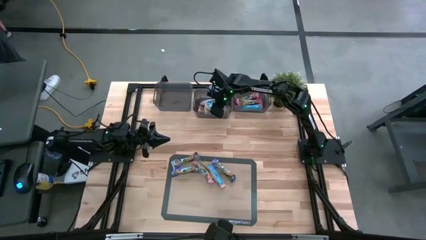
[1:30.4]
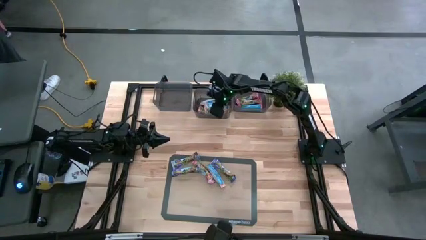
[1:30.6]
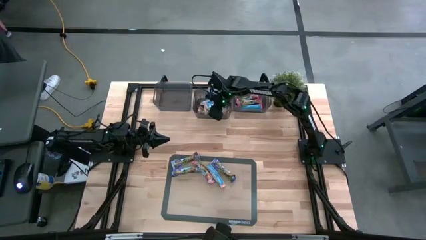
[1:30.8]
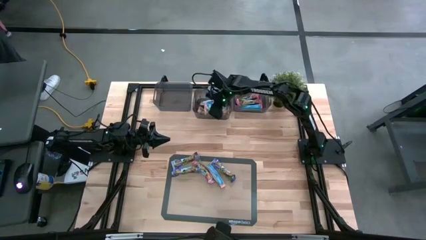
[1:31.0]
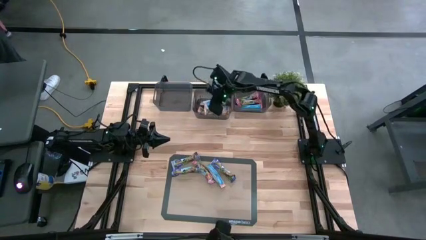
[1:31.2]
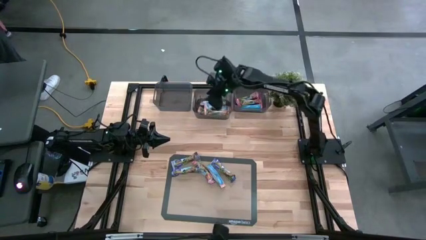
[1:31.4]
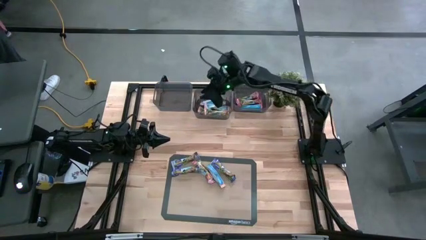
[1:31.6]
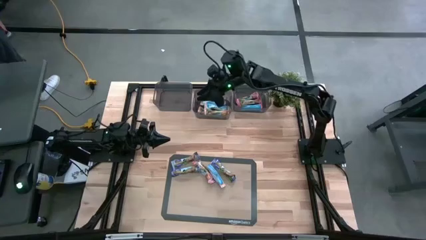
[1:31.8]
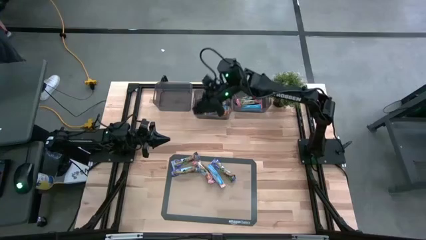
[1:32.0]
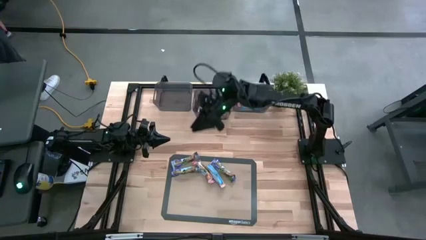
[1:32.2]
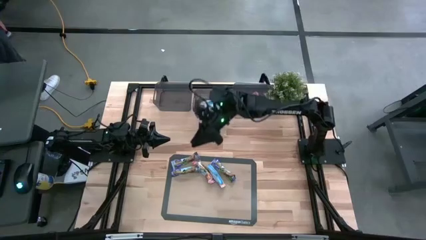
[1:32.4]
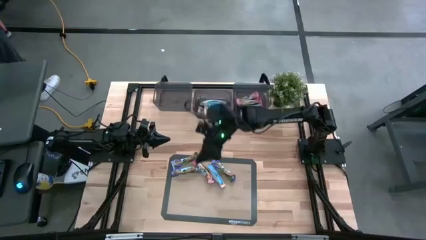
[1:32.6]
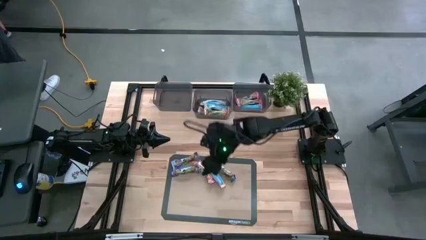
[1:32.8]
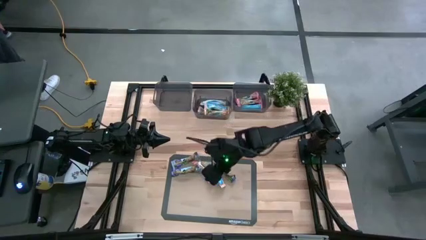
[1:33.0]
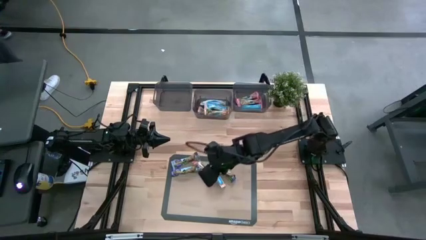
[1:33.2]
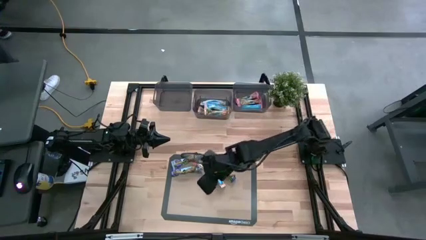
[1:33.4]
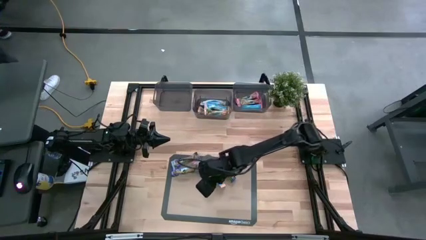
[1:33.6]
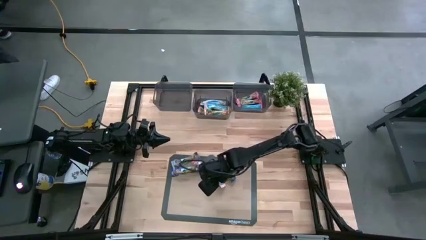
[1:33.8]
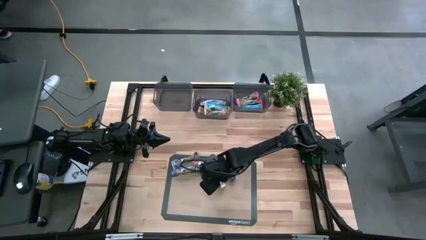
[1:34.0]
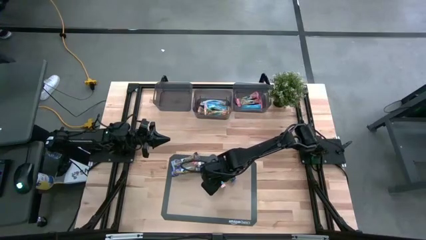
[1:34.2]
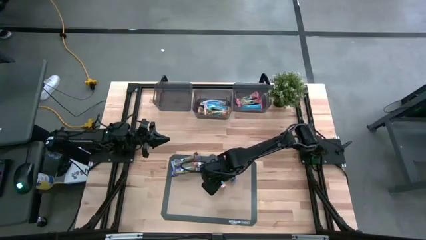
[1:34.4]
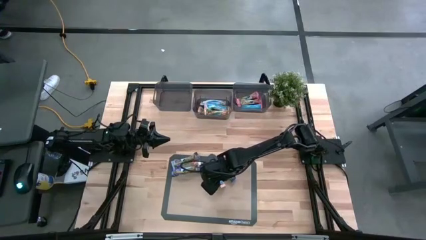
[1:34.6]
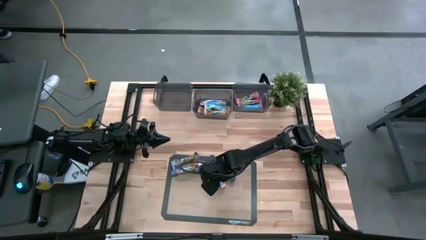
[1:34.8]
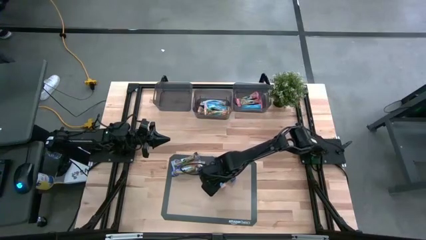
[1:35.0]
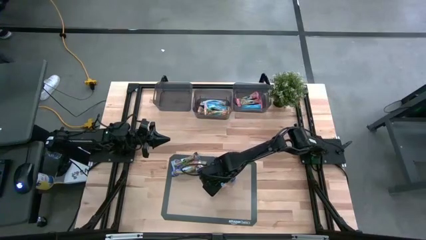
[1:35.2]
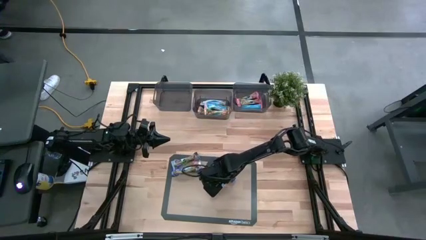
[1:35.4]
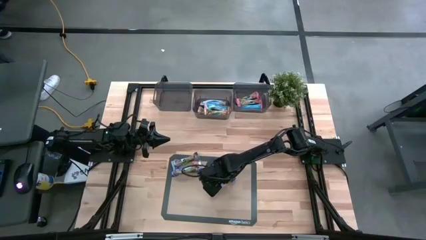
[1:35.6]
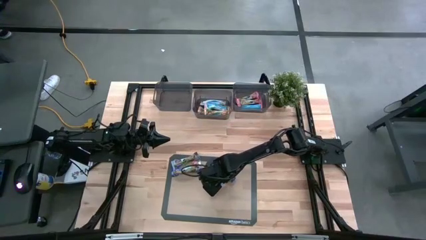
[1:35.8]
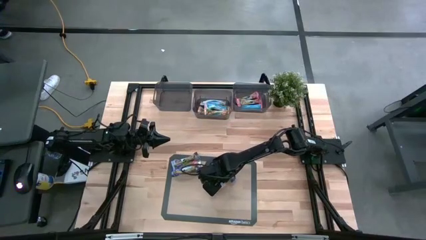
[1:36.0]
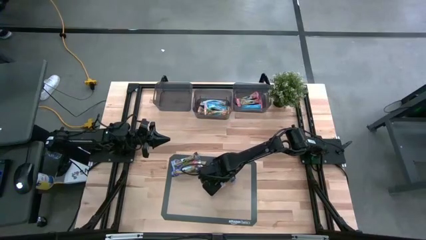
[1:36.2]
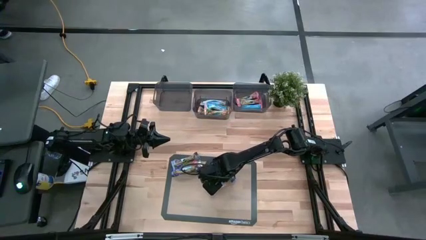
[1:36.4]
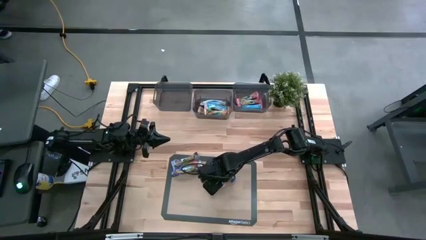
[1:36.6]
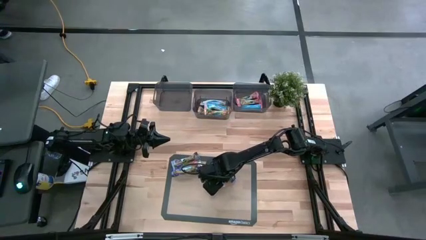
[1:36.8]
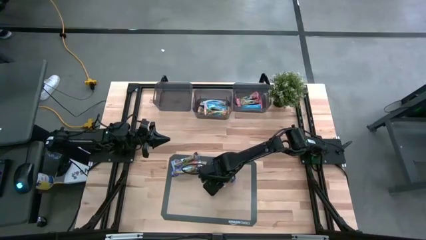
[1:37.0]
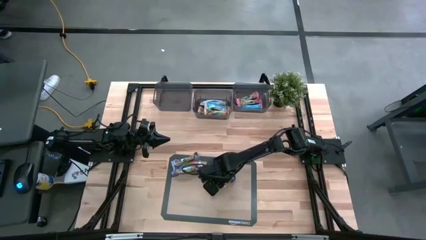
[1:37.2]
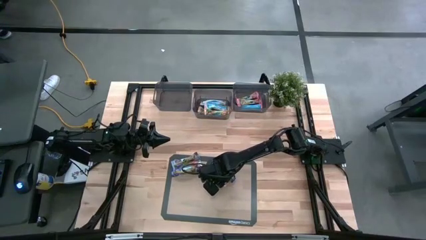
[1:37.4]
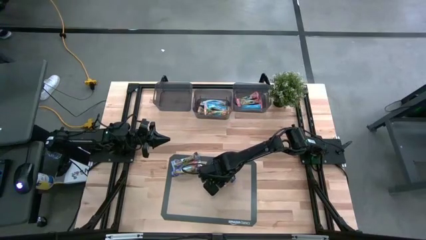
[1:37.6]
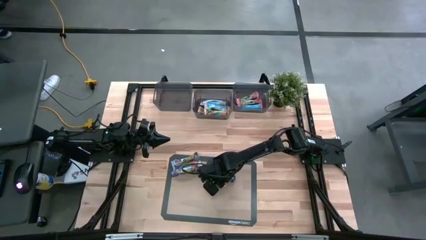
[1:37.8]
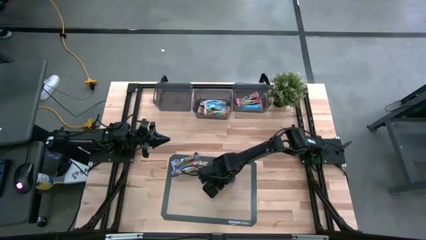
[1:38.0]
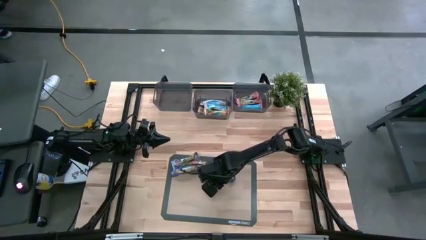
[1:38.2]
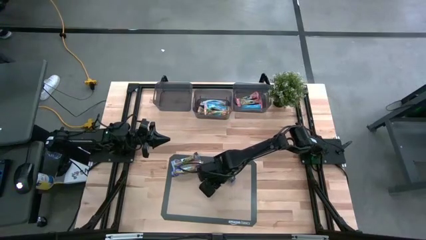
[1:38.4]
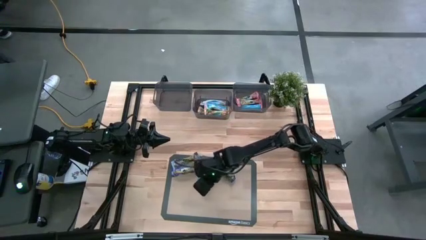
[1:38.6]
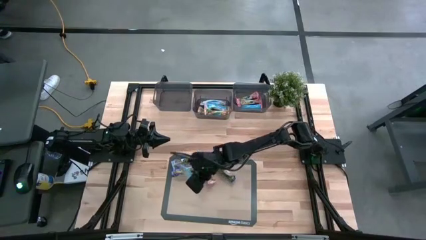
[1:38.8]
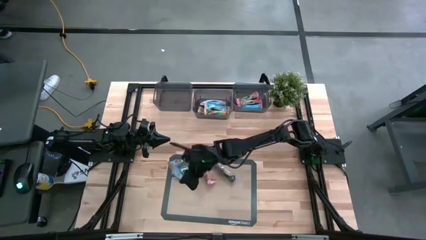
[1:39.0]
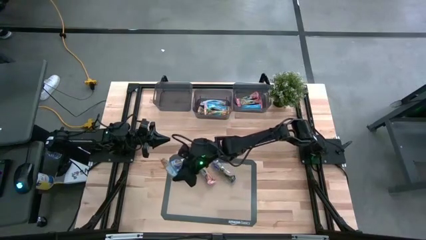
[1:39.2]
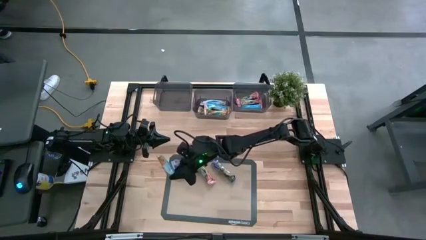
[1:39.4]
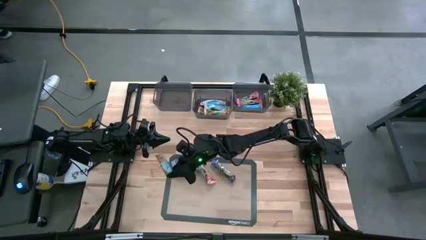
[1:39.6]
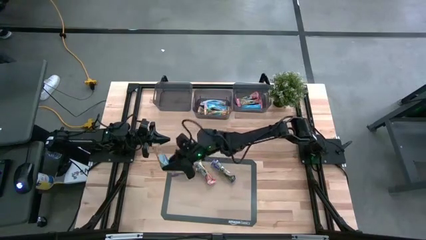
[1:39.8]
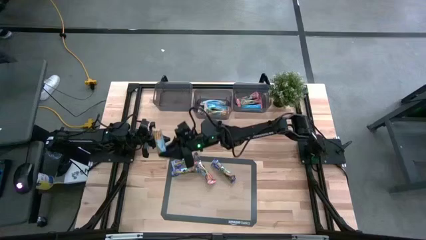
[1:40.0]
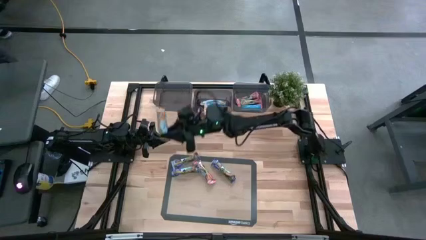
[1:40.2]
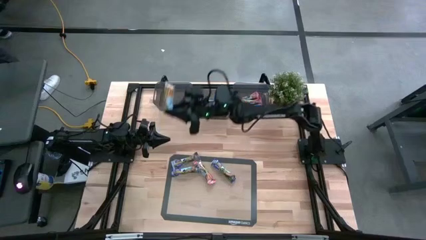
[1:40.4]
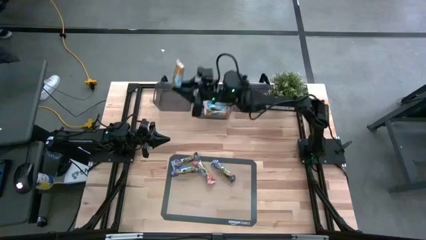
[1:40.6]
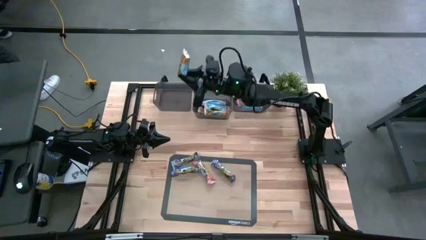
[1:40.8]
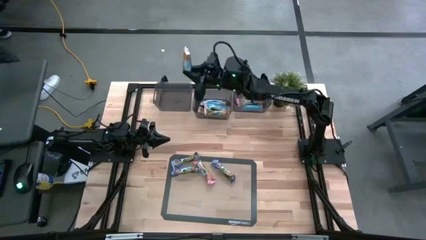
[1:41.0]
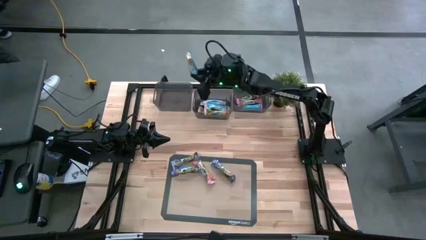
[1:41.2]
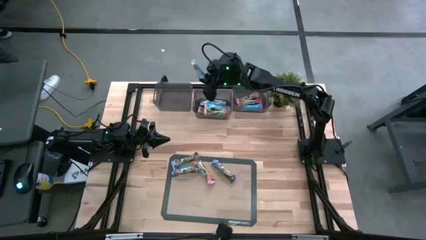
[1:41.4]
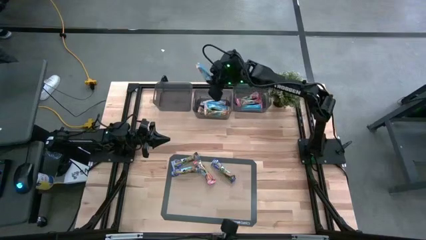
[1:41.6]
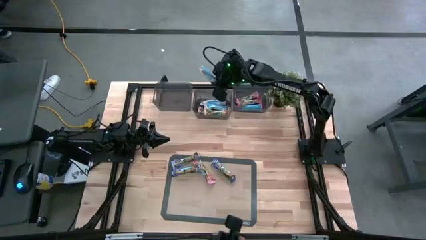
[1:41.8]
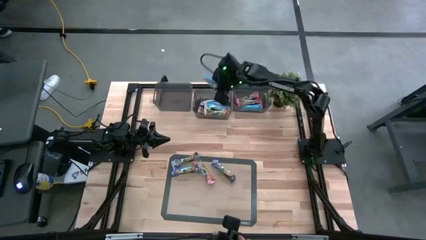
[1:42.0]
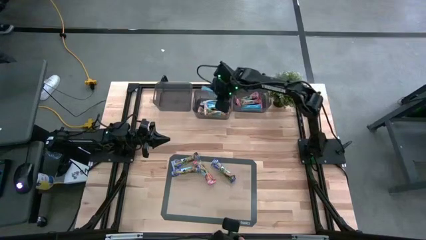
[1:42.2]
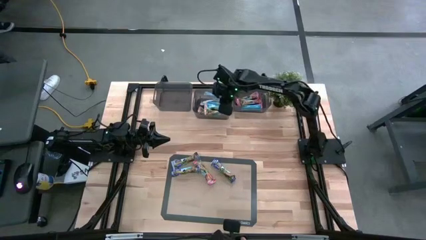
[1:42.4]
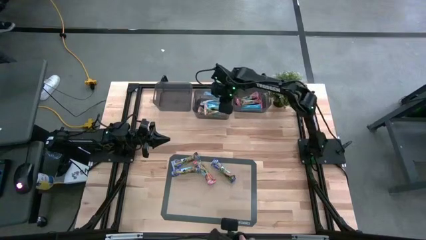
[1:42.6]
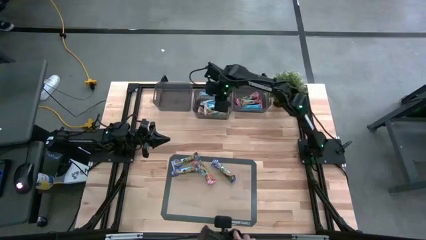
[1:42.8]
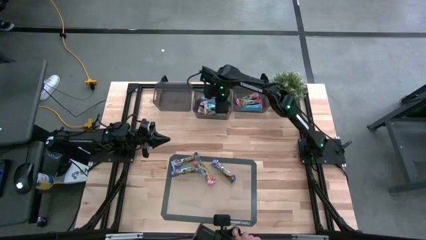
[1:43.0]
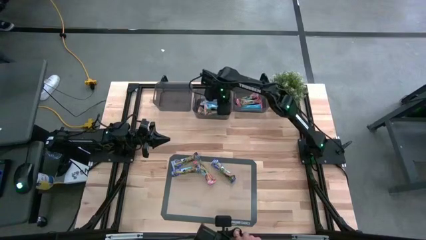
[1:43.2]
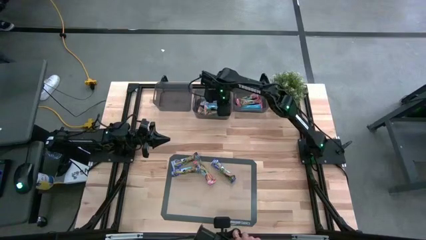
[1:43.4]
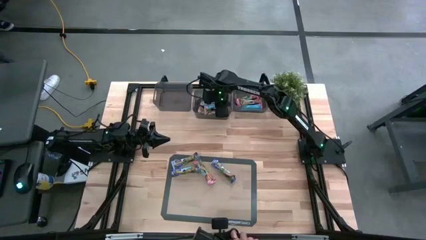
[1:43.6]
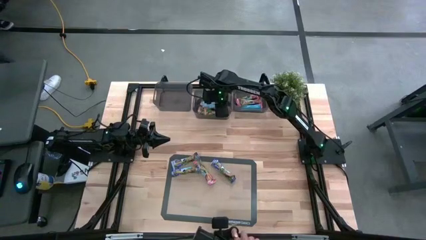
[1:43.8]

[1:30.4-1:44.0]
Task: Pick and place Granola Bars by type
Put the yellow granola bar into the center black bin

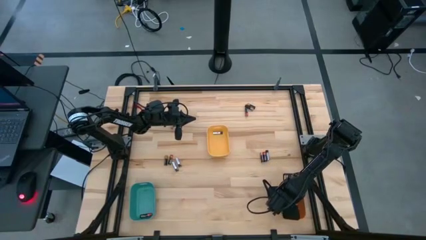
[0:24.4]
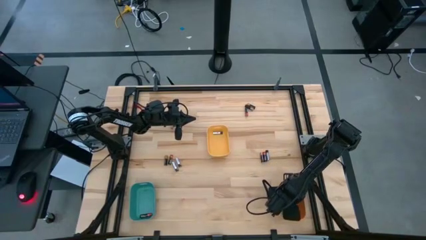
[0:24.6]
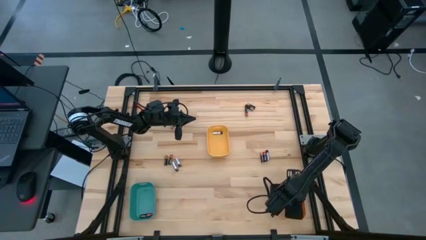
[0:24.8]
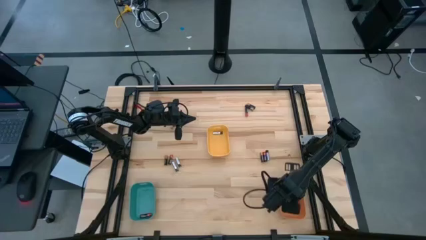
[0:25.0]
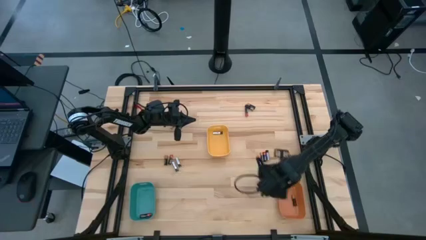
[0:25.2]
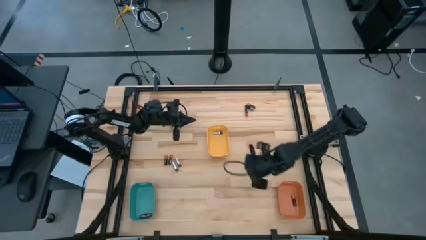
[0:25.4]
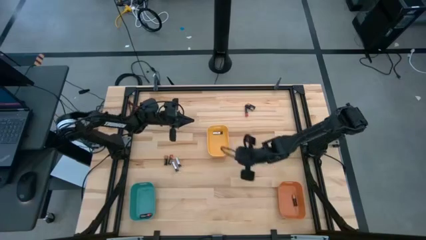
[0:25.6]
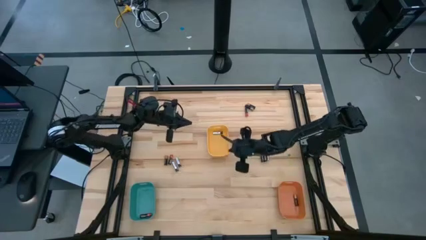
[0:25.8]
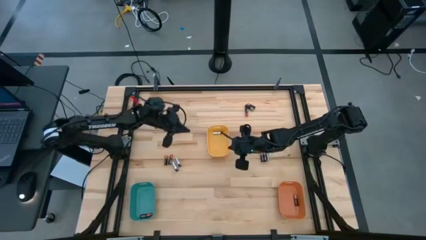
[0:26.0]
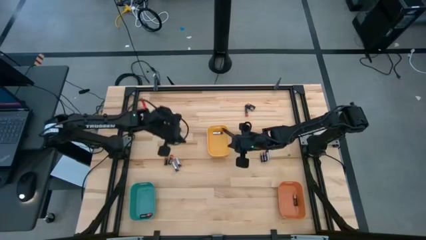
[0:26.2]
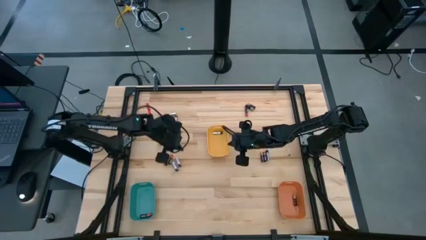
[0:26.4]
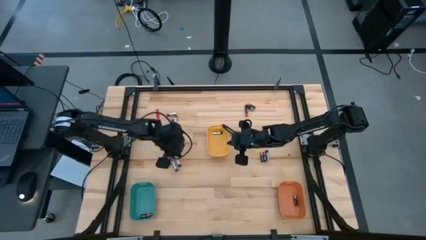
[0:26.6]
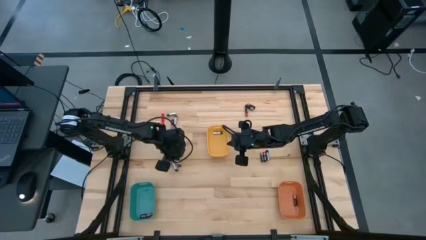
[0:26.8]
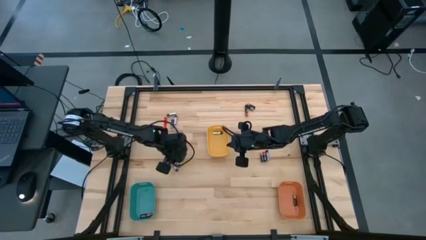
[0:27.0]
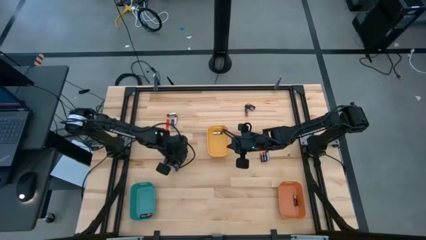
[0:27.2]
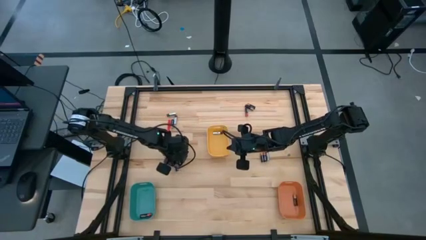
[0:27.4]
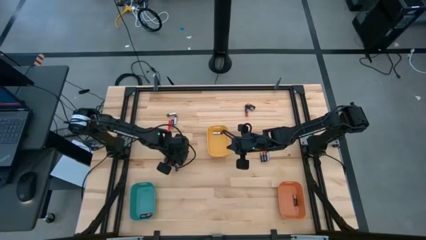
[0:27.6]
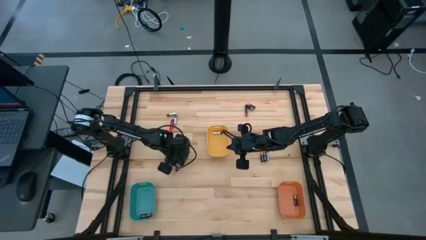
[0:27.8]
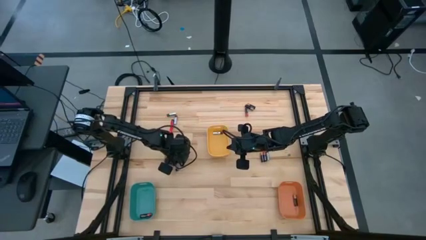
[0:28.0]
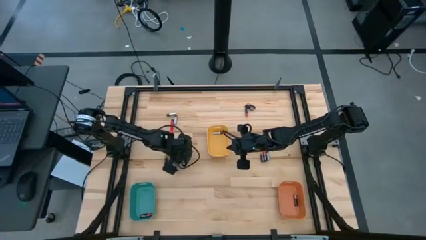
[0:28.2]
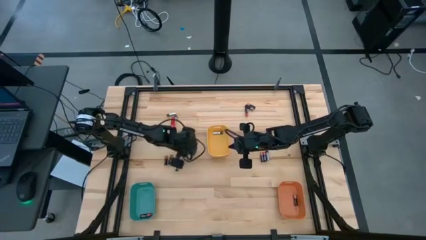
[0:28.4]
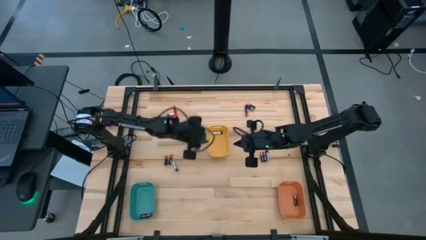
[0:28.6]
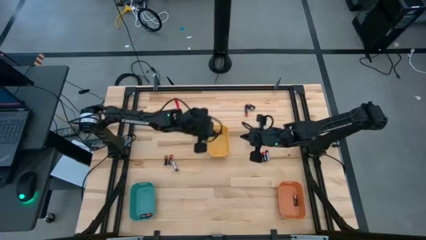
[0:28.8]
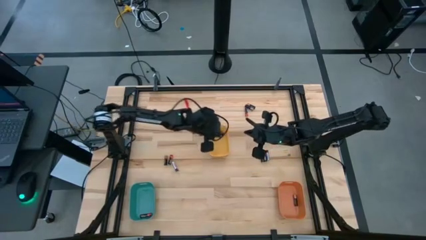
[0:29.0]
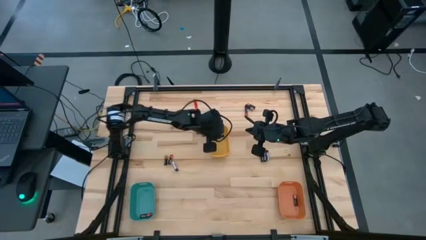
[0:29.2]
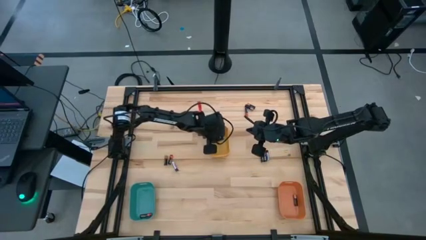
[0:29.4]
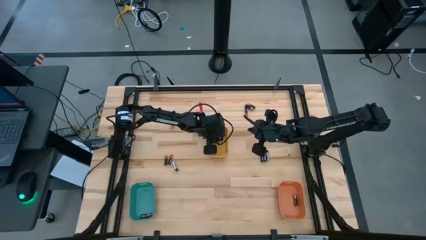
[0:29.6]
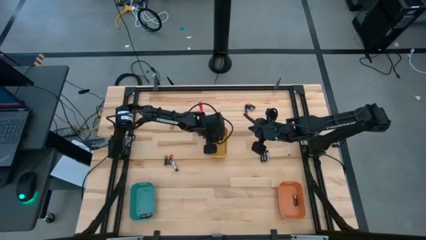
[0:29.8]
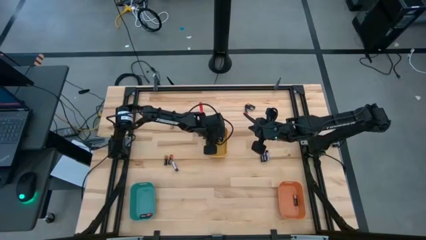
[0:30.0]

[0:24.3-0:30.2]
Task: Sort batteries
Put the silver battery into the yellow bin
